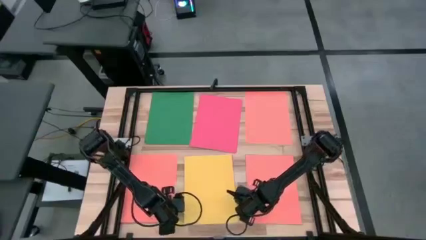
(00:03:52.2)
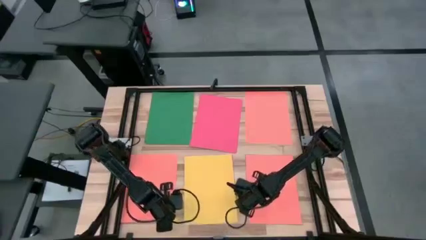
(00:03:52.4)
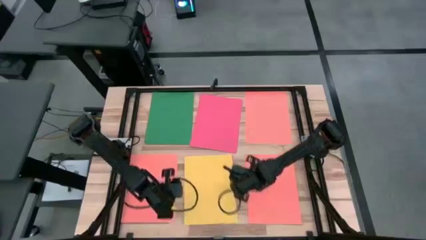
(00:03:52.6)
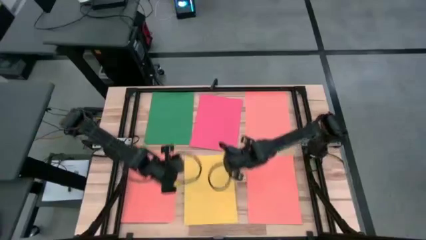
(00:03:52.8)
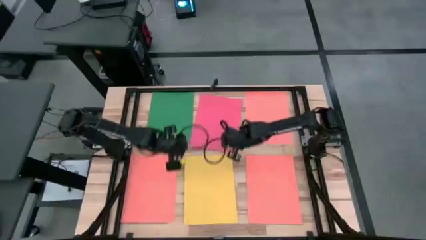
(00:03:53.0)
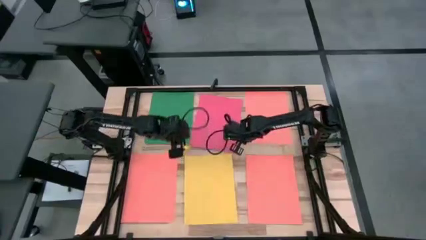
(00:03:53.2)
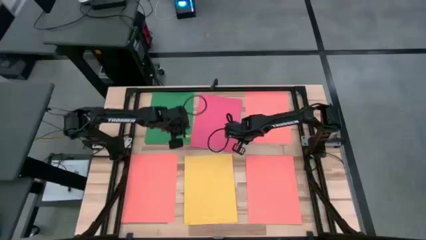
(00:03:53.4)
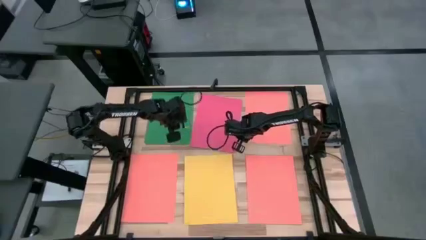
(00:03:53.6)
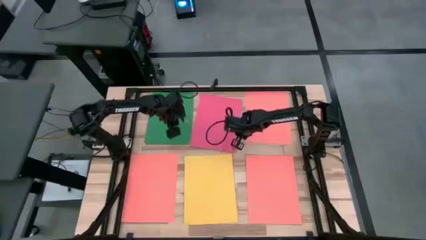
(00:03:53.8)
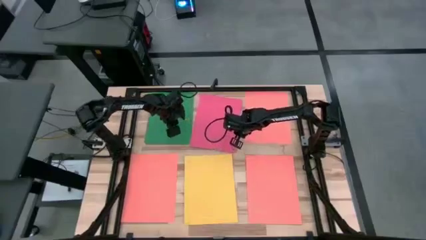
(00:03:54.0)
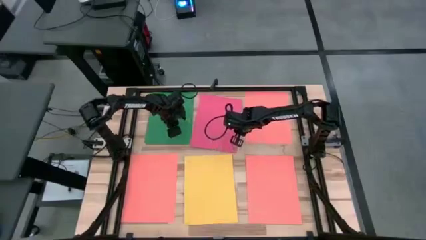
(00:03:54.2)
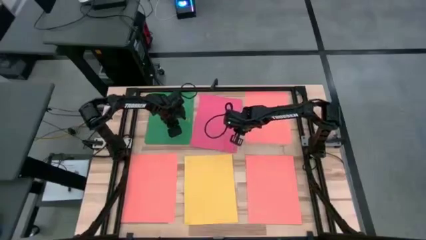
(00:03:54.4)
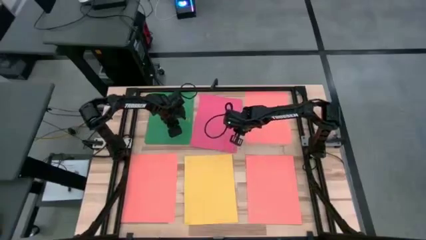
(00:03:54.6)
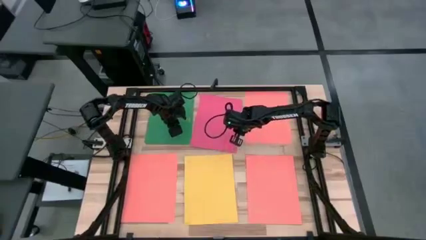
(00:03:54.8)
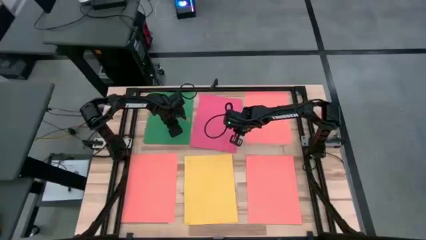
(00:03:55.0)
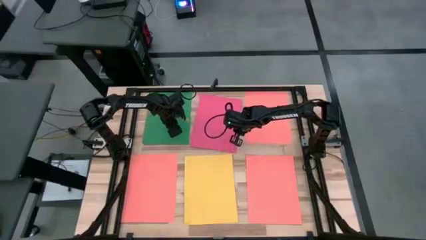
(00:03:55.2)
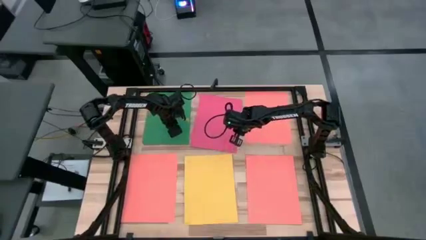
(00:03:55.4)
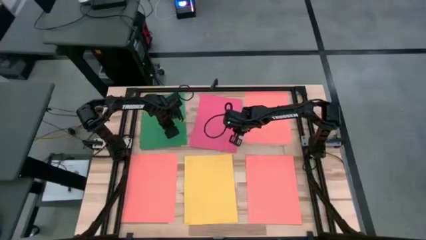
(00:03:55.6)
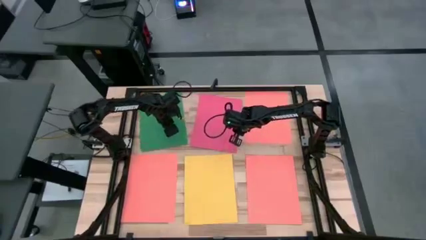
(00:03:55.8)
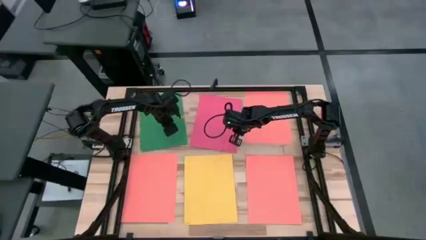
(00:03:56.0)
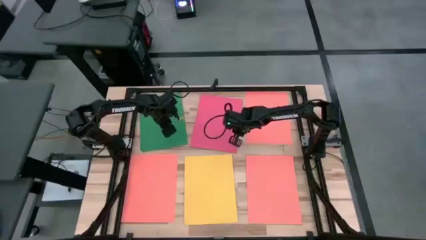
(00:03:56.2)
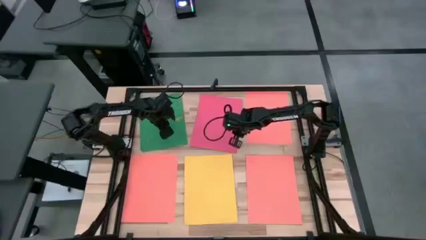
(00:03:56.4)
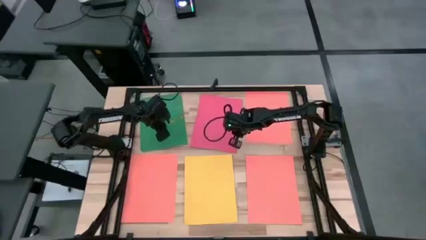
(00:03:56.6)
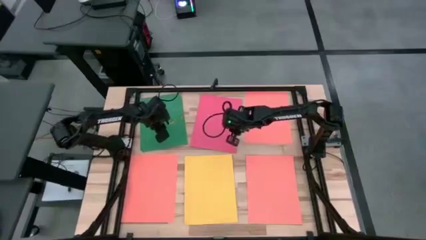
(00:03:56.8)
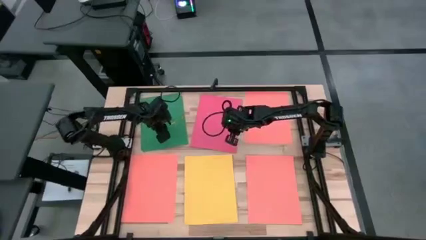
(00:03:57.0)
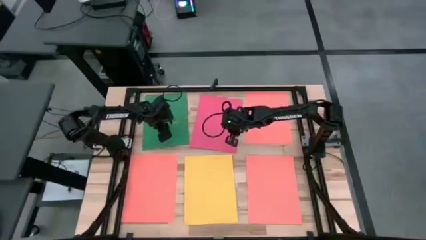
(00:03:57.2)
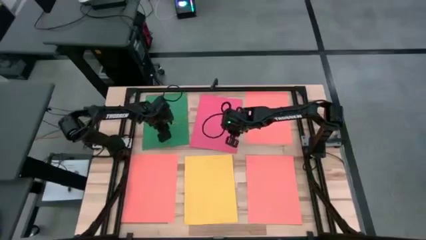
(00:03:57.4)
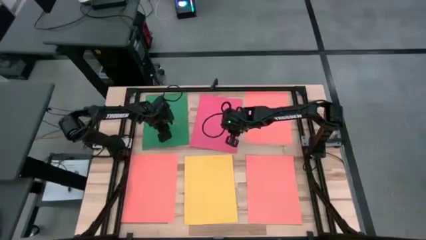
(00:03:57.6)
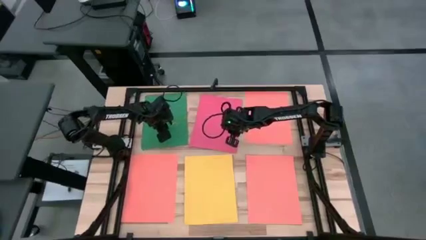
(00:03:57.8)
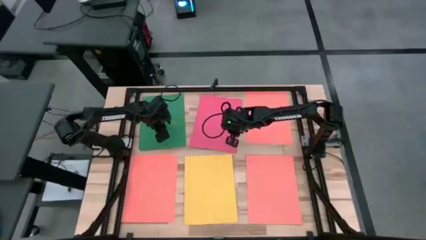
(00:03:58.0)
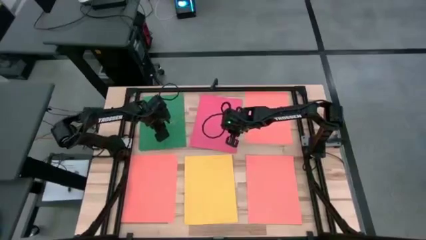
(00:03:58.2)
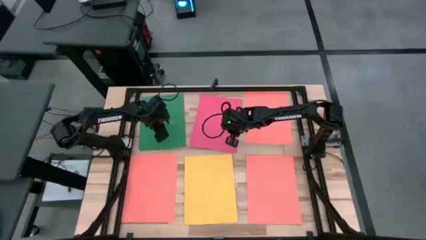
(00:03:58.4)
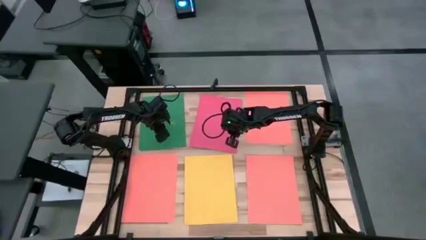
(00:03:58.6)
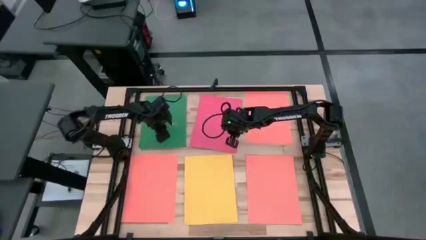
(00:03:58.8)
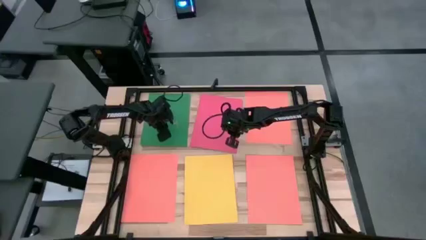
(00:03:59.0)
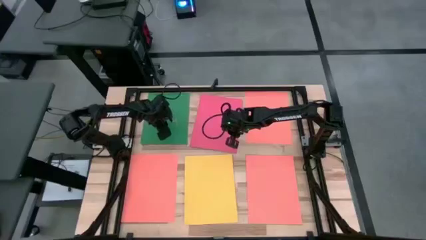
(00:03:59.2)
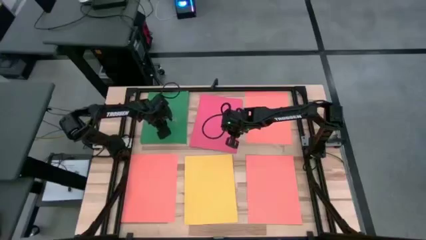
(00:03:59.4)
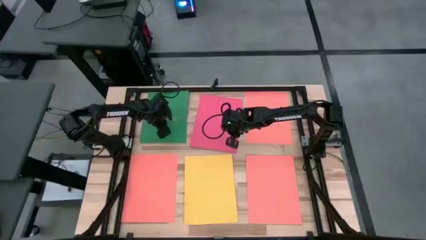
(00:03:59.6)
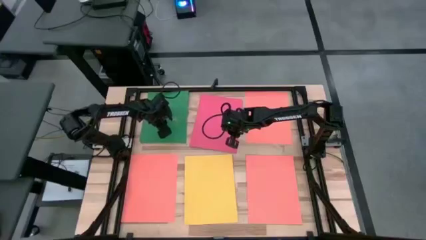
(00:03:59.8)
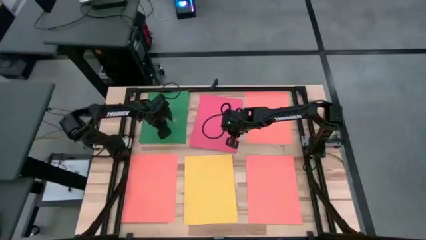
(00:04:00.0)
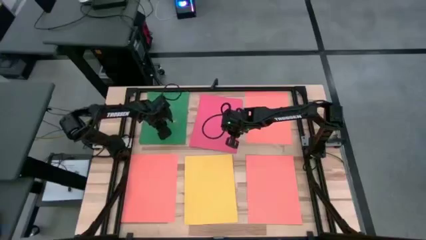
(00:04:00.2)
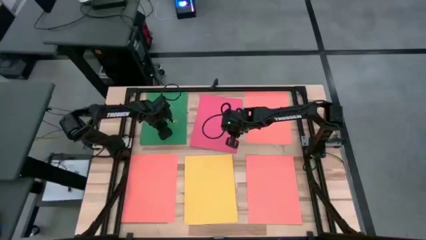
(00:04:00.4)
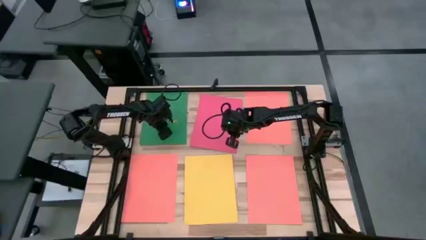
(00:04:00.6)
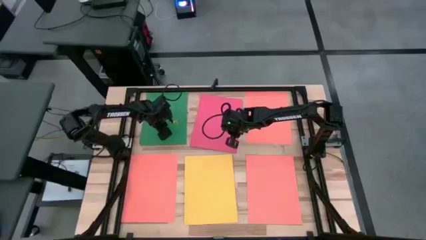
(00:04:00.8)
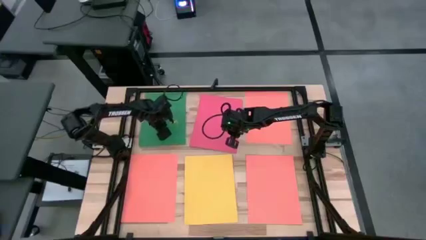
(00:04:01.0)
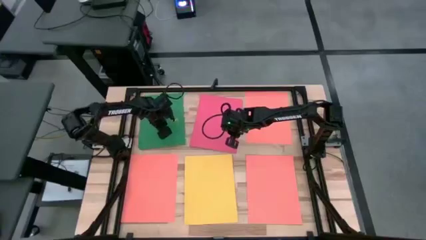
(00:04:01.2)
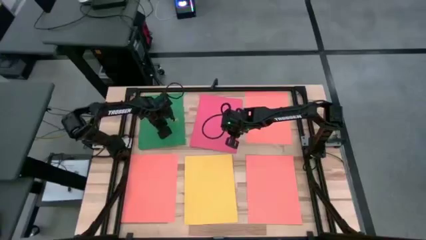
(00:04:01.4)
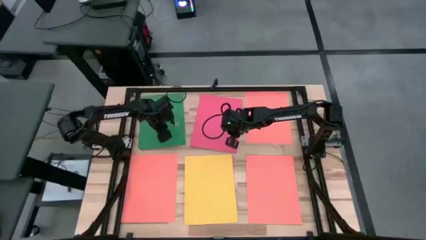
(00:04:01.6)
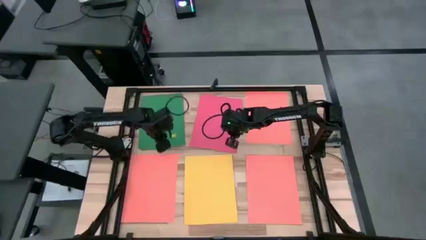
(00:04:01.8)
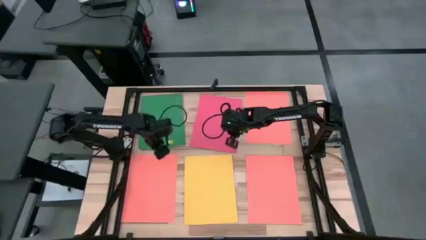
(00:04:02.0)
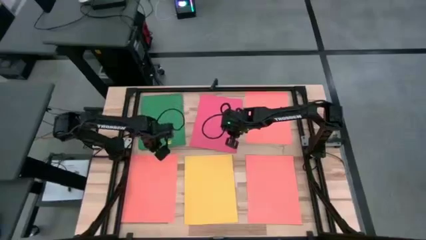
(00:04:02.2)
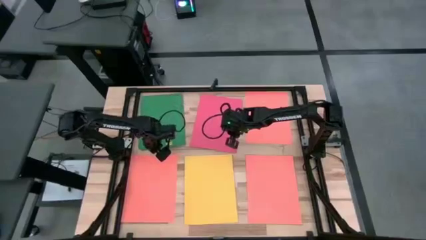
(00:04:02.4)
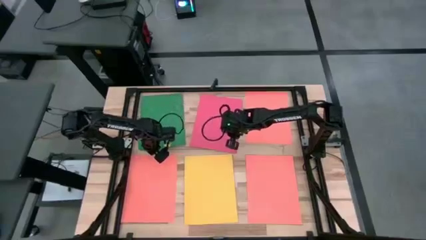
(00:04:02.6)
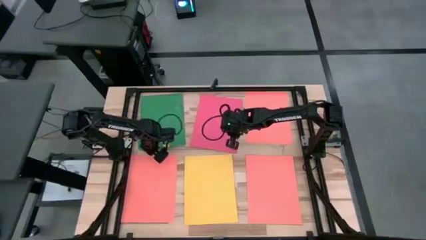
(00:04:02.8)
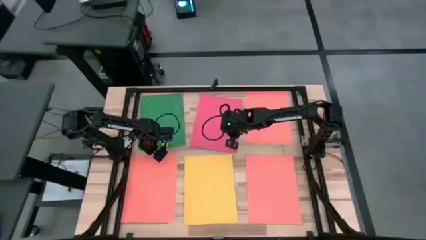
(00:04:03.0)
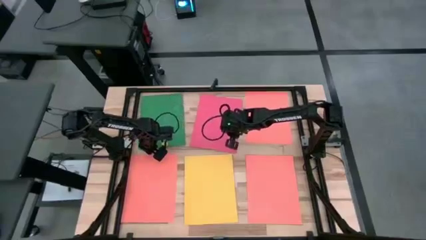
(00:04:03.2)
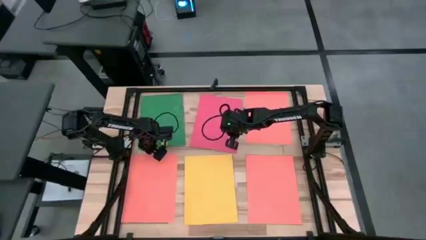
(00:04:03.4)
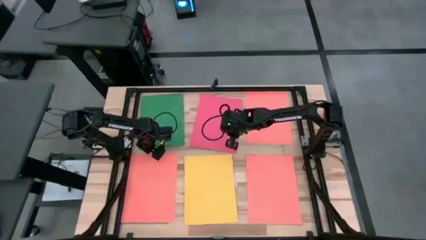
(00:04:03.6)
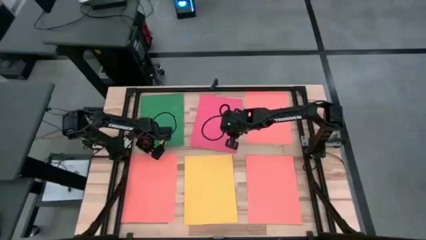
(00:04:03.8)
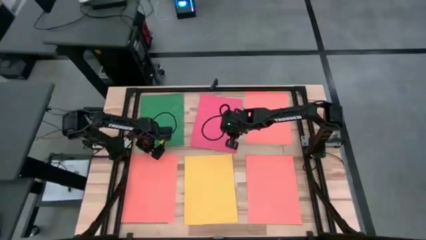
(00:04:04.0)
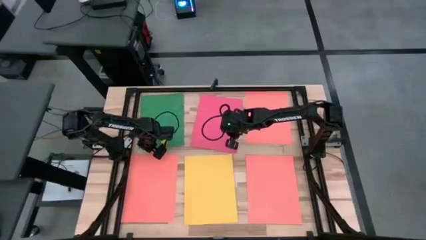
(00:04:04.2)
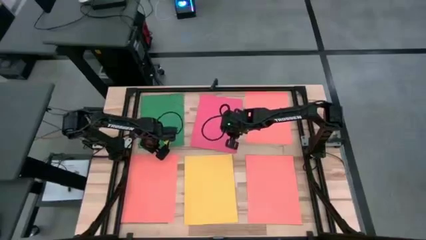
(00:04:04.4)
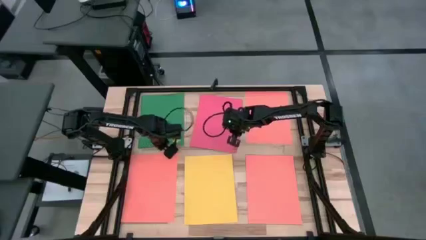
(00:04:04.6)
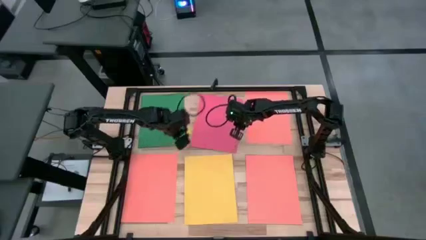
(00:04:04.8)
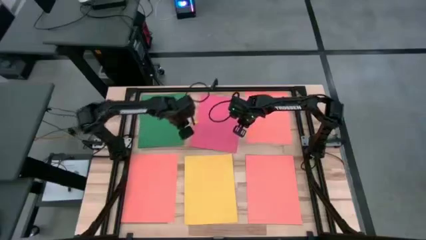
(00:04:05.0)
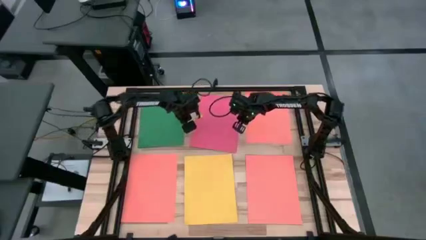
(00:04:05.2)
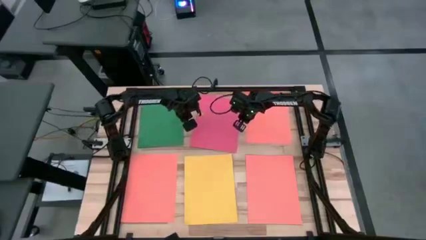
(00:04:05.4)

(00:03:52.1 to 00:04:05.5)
Task: Organize paper
Adjust the green papers
